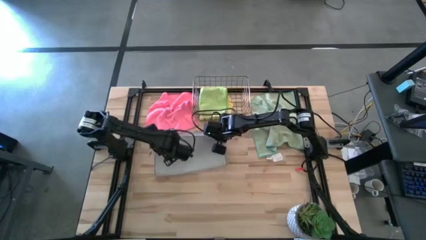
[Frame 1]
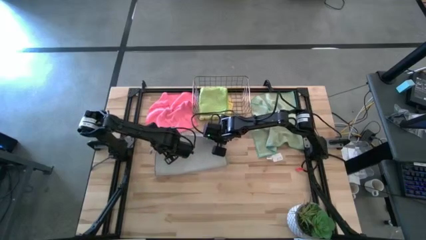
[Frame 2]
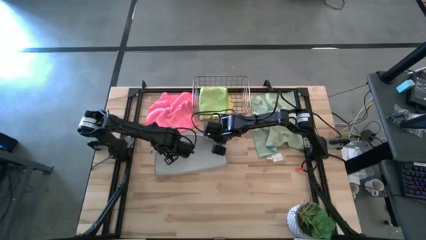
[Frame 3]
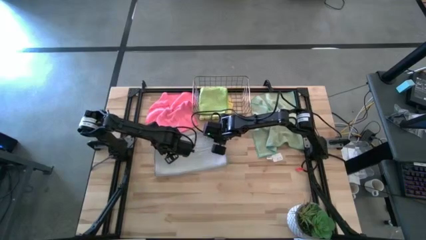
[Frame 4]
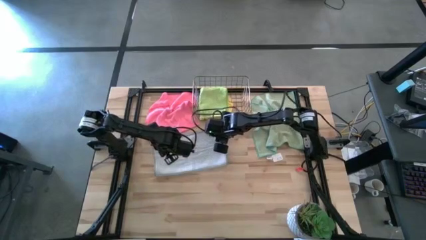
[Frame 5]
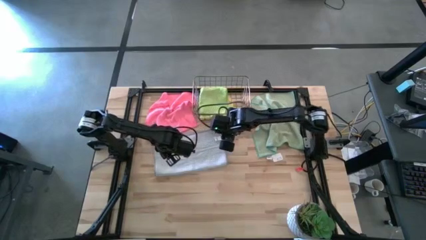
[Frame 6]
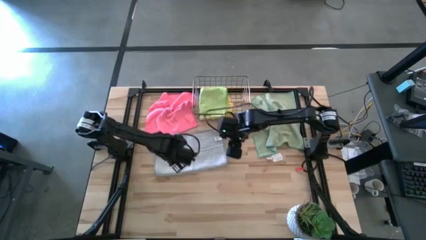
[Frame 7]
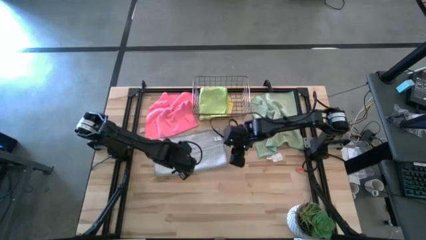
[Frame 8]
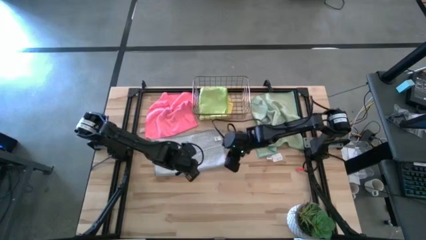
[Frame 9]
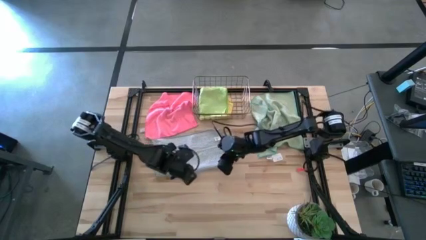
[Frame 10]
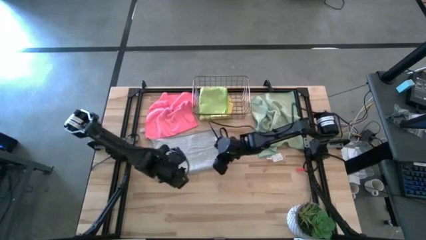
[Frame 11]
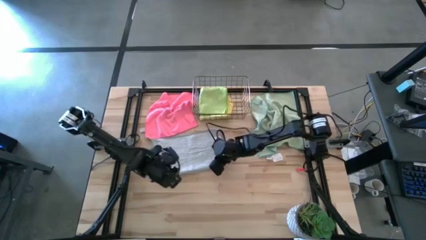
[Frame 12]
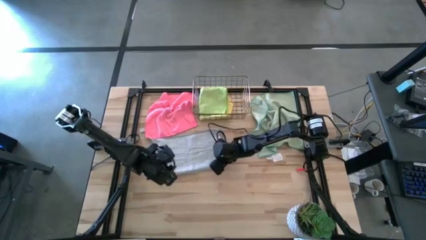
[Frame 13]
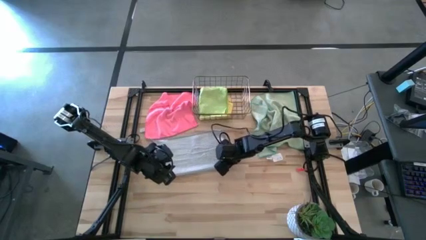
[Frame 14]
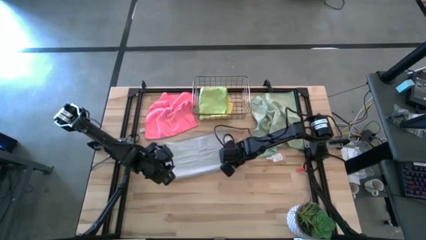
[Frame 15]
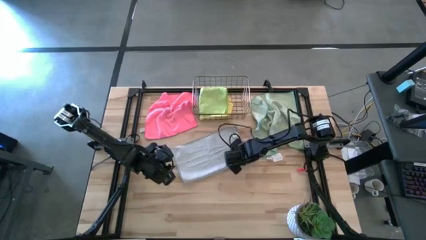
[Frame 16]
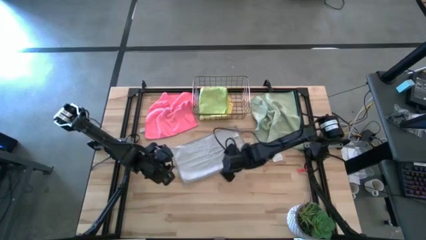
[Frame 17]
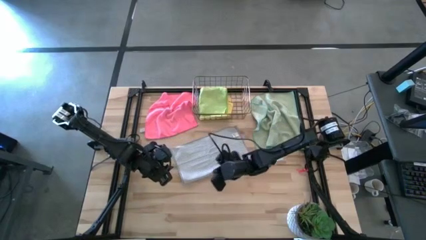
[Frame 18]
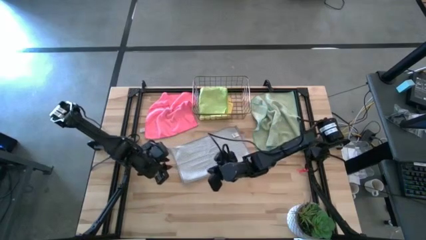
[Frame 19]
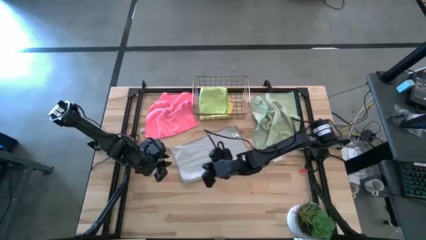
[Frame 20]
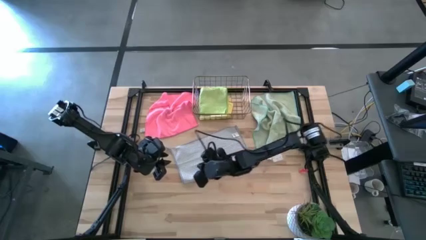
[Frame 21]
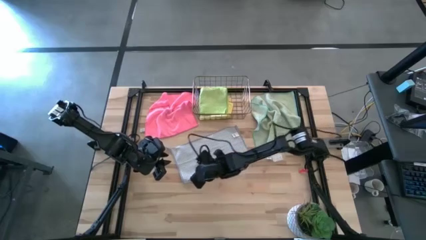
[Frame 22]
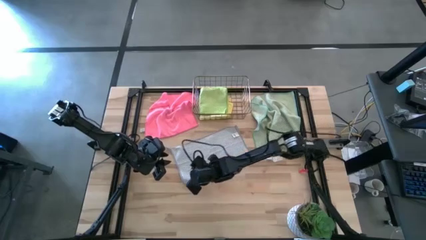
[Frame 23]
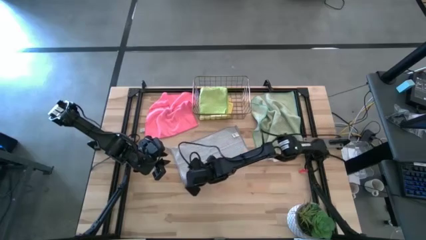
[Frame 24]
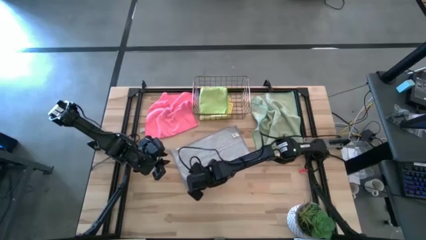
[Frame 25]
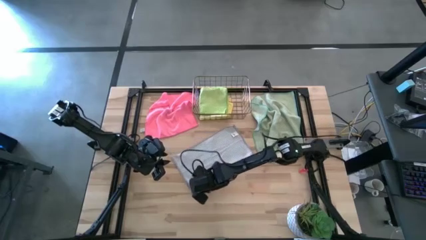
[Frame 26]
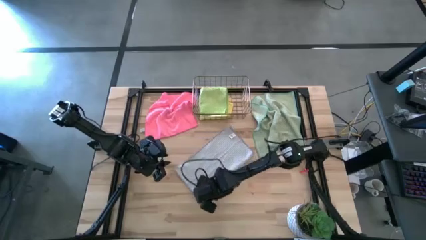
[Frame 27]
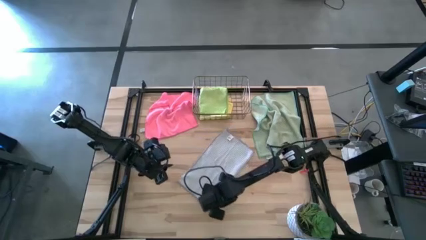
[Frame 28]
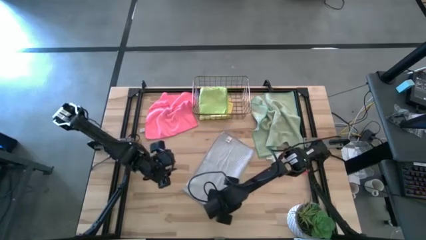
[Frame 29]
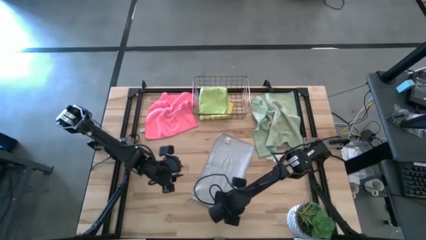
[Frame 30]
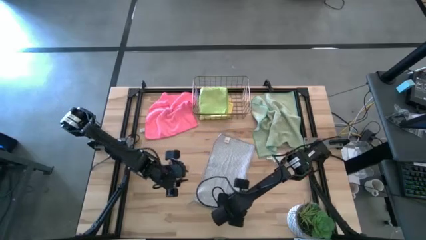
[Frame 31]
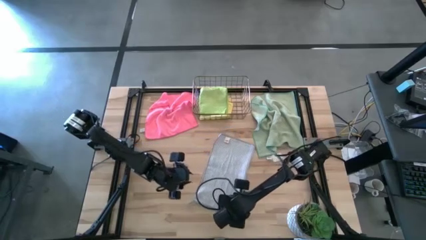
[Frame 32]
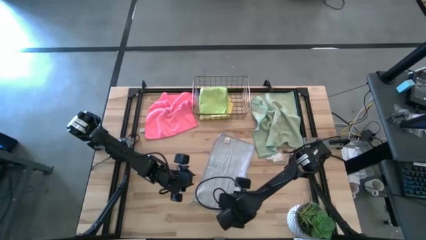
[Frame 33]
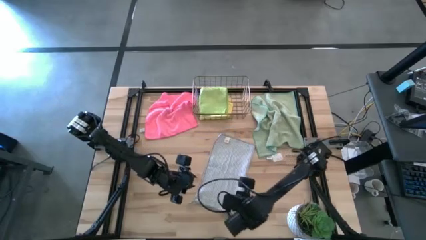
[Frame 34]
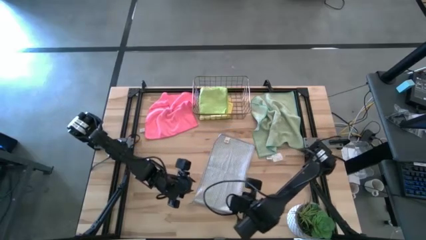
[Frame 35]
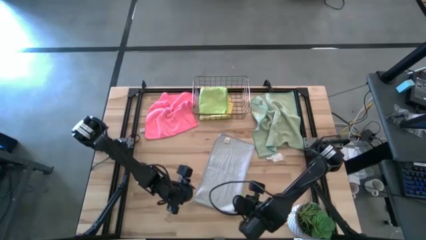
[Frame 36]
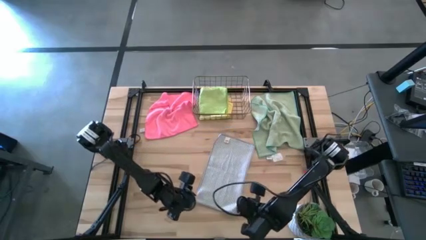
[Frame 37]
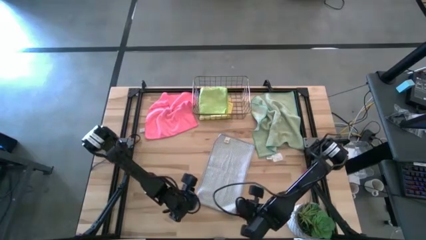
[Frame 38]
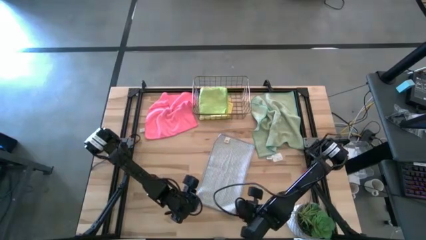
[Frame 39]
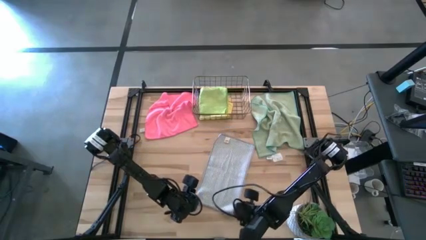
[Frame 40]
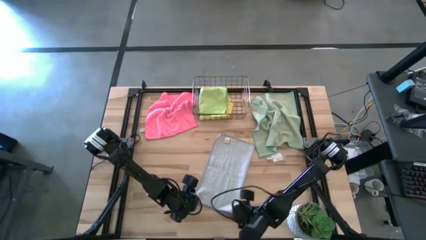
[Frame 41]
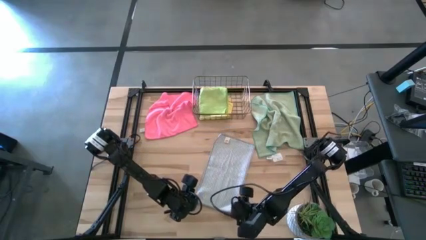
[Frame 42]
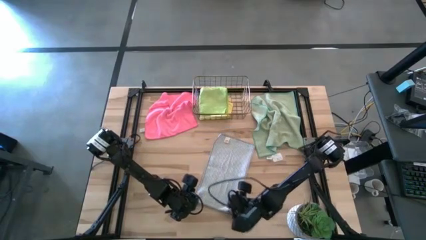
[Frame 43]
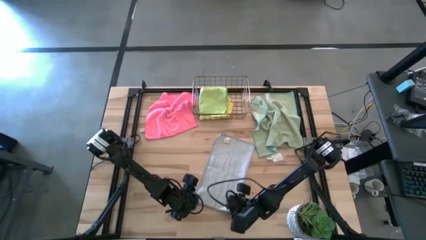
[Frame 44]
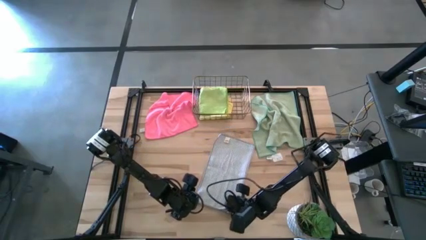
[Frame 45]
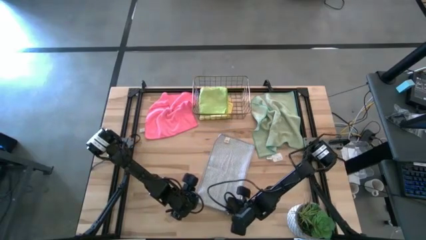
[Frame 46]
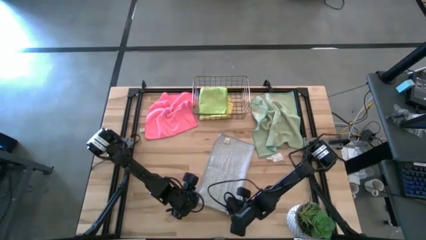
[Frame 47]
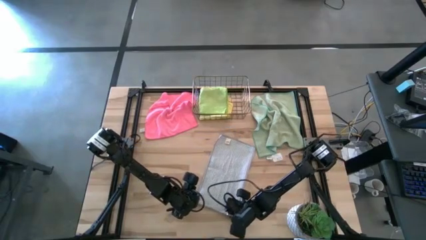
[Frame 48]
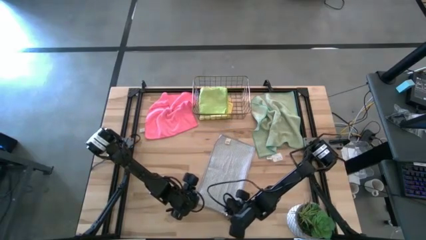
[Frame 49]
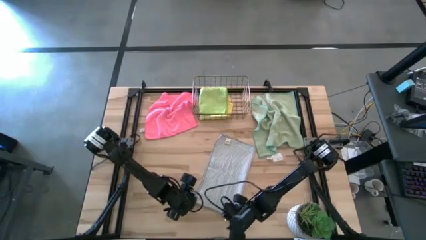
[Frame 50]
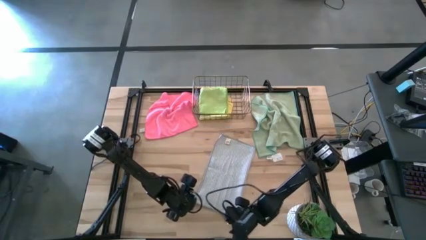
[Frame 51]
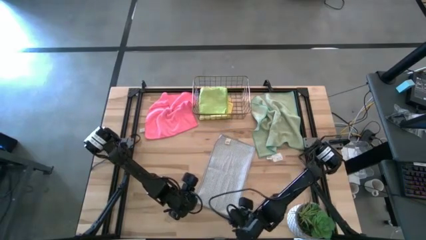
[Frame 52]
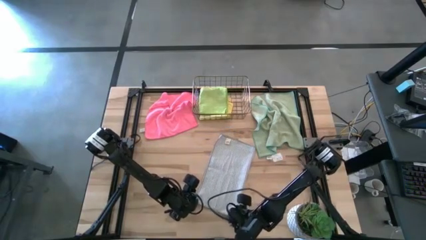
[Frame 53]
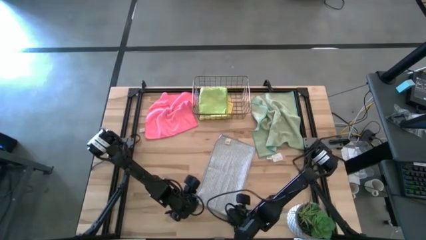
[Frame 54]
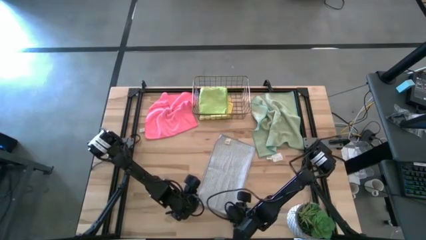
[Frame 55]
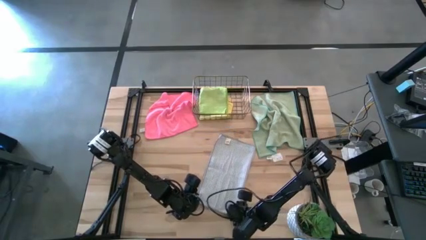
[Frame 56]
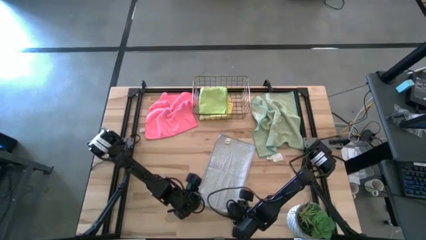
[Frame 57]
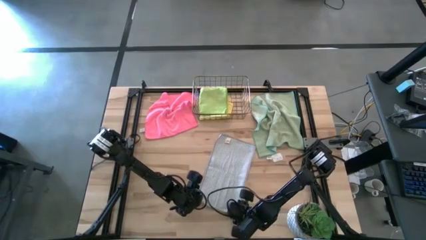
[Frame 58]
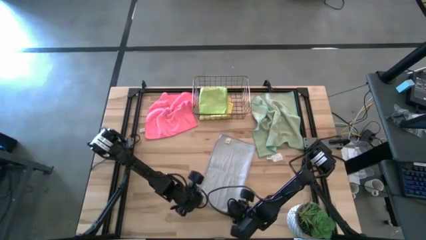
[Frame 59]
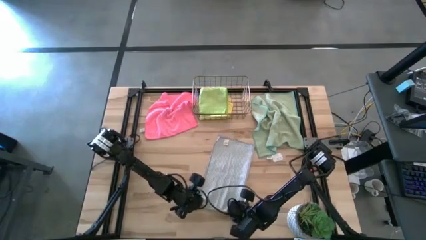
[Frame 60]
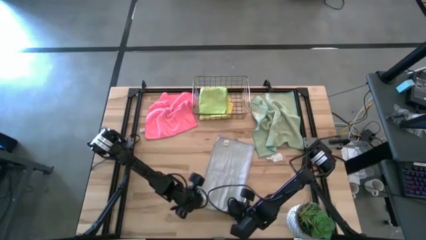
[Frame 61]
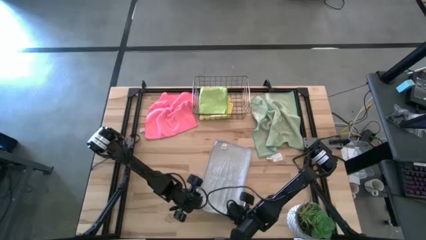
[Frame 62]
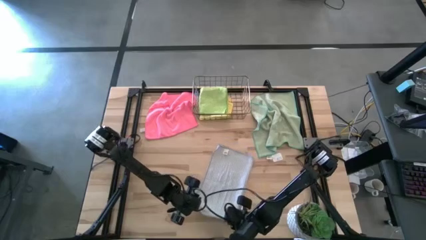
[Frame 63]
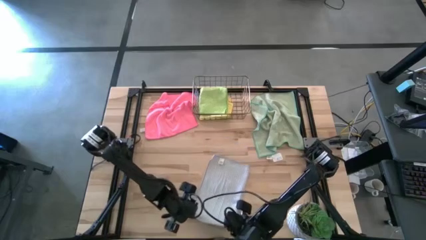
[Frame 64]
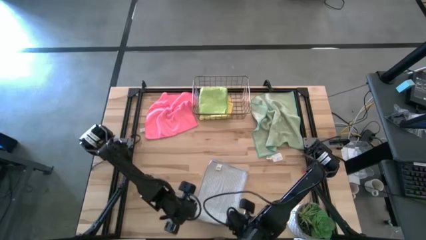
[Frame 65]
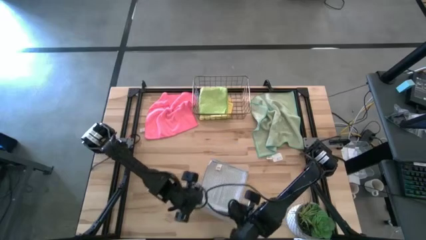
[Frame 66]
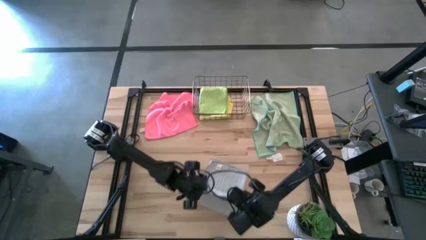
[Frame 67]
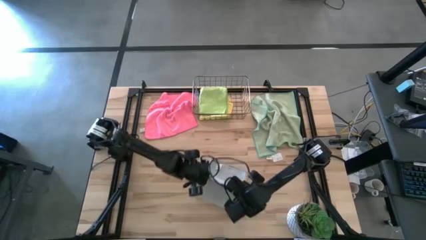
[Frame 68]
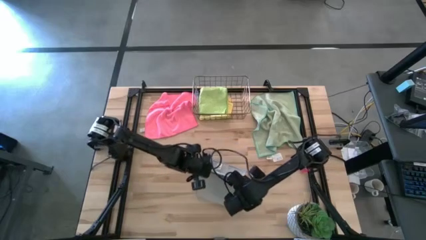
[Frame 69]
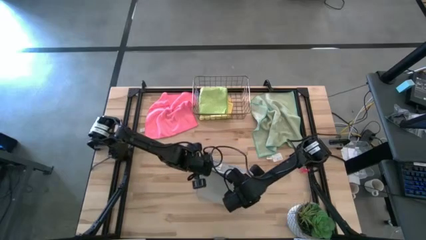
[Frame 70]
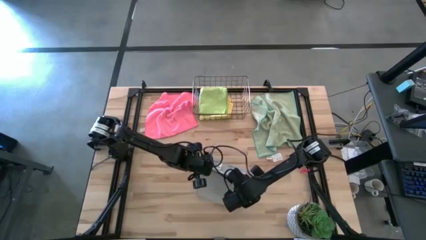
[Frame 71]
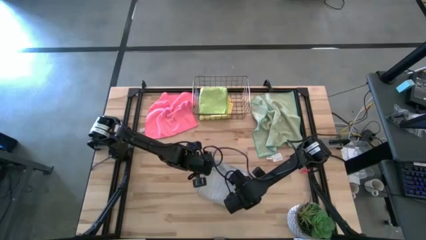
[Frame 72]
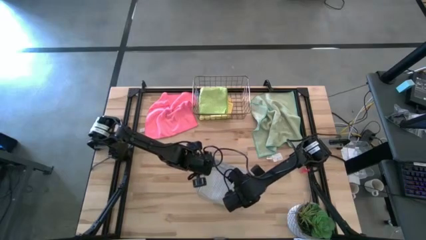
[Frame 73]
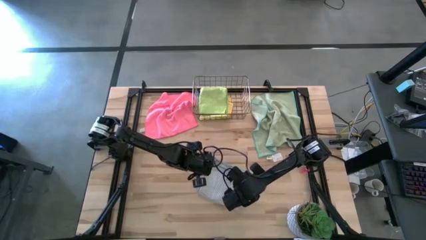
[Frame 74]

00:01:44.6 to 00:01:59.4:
Task: Fold microfiber towels
Fold the gray towel
